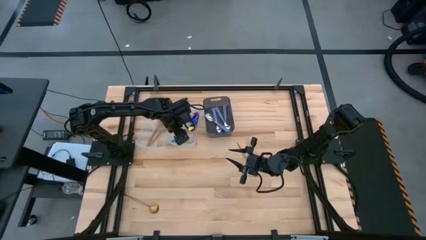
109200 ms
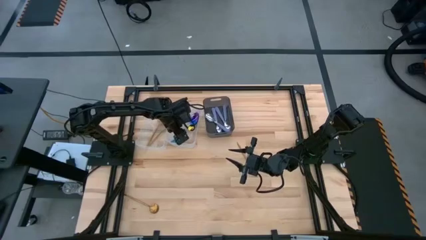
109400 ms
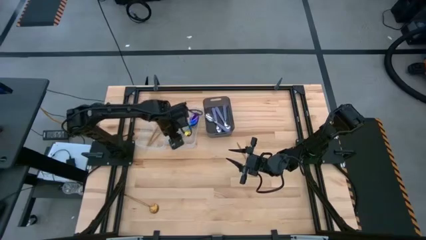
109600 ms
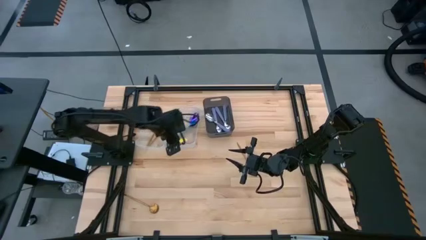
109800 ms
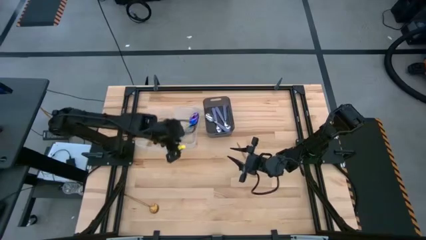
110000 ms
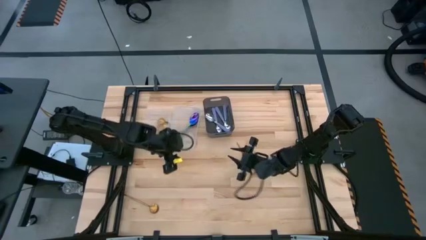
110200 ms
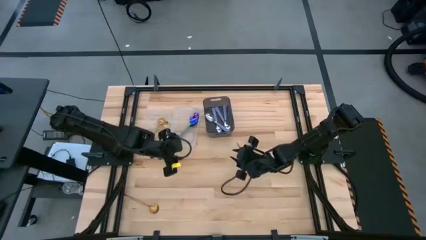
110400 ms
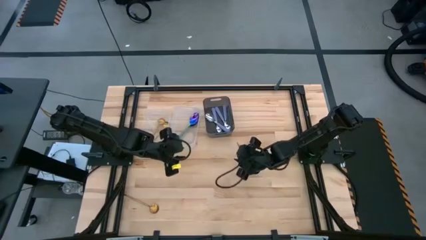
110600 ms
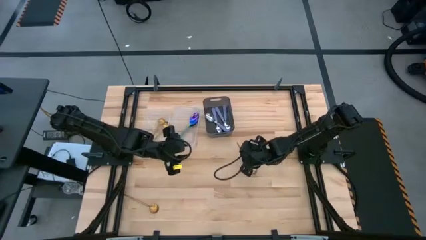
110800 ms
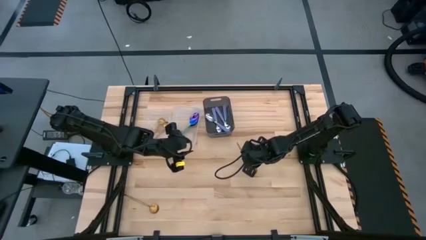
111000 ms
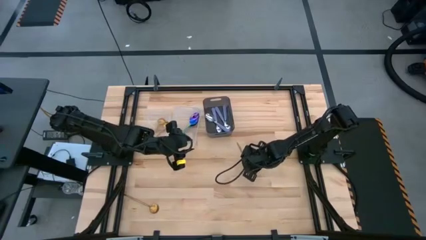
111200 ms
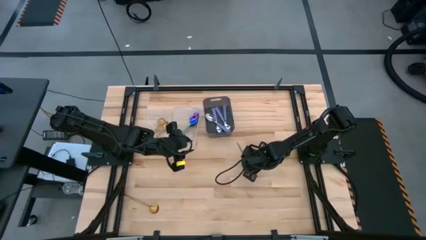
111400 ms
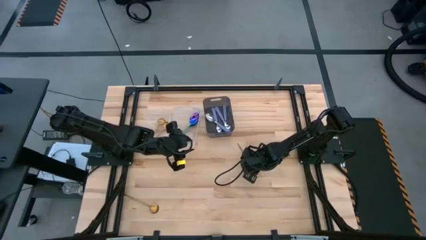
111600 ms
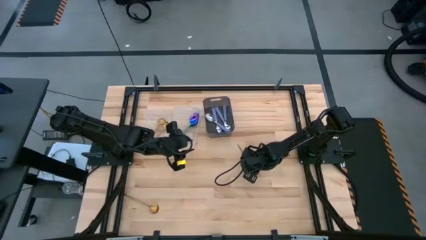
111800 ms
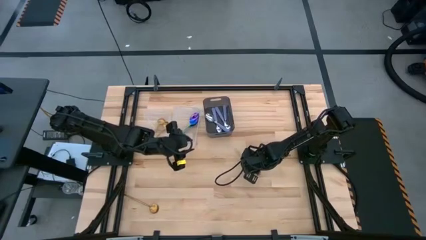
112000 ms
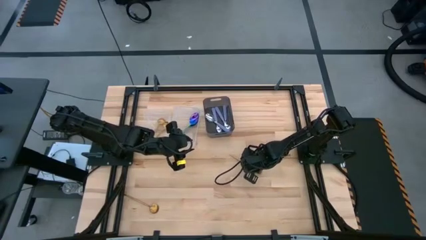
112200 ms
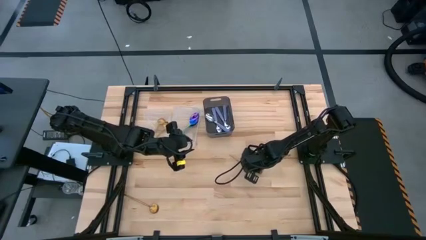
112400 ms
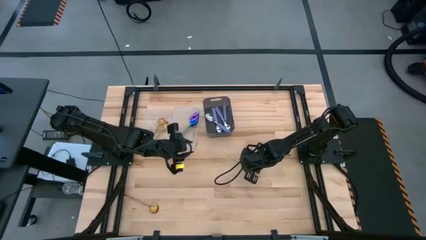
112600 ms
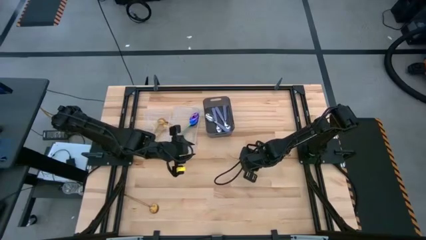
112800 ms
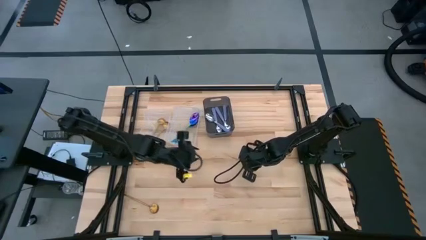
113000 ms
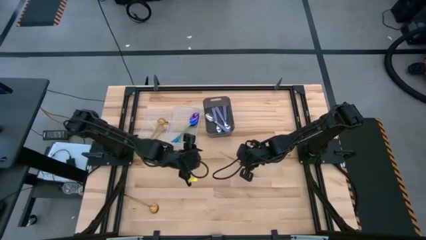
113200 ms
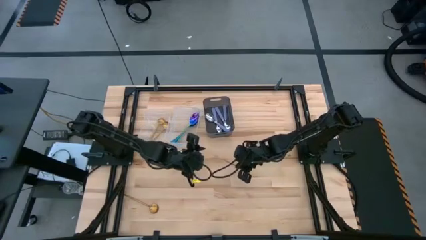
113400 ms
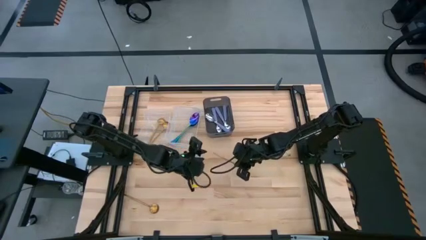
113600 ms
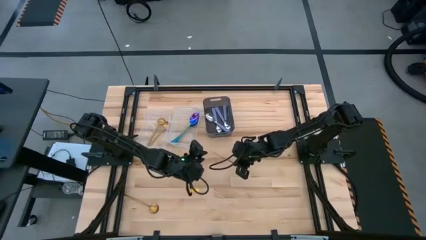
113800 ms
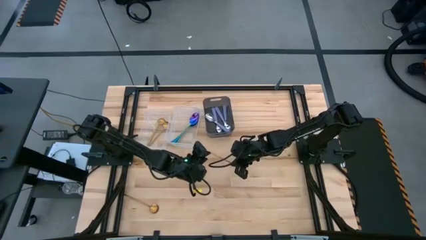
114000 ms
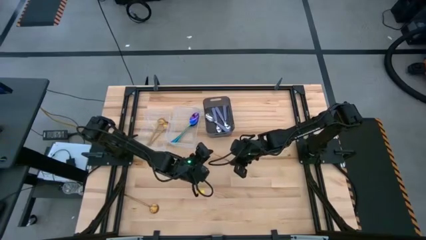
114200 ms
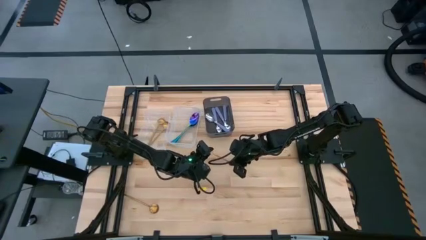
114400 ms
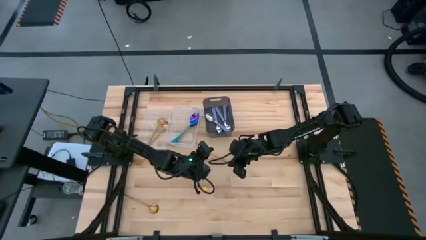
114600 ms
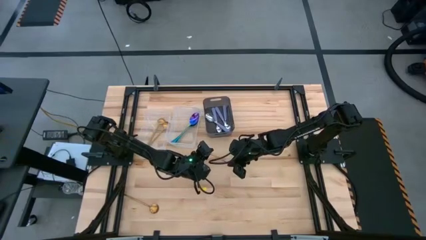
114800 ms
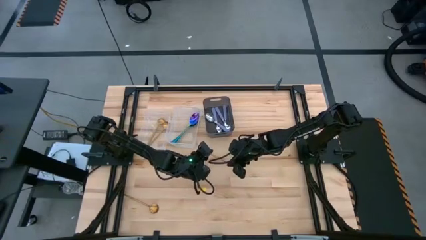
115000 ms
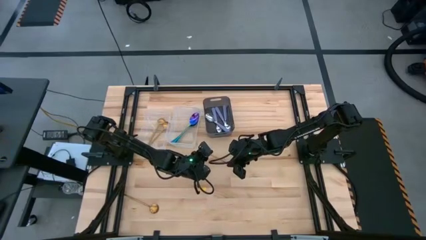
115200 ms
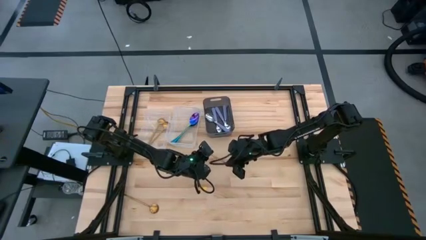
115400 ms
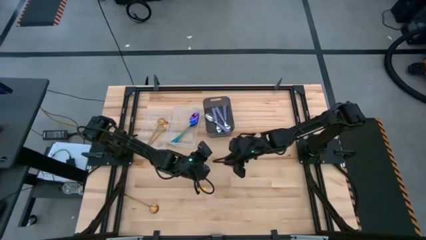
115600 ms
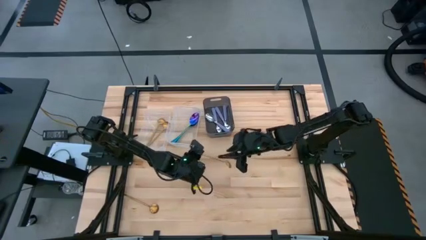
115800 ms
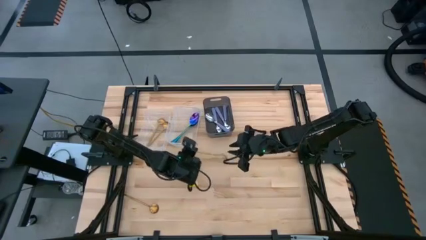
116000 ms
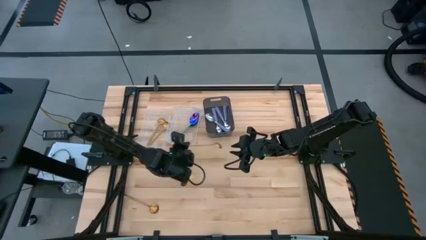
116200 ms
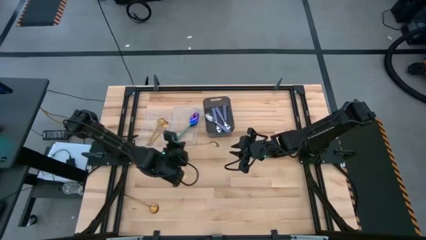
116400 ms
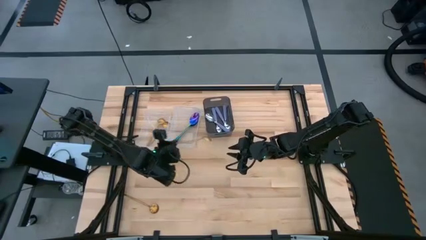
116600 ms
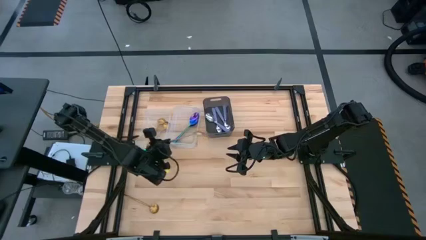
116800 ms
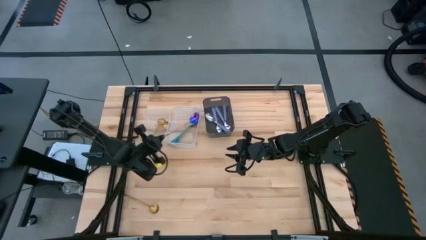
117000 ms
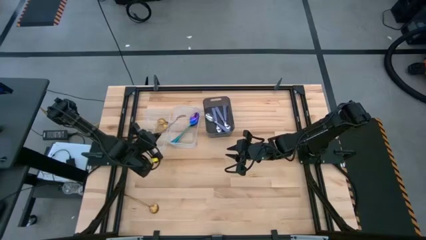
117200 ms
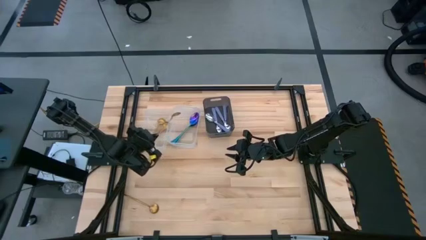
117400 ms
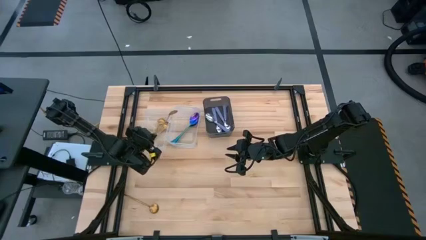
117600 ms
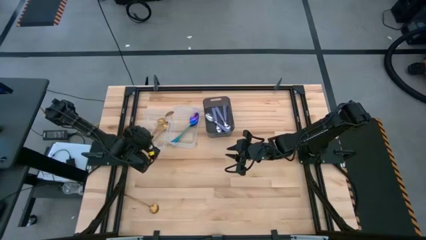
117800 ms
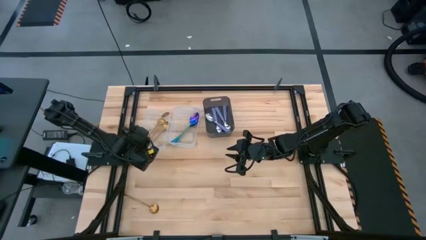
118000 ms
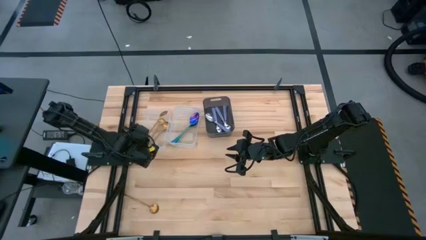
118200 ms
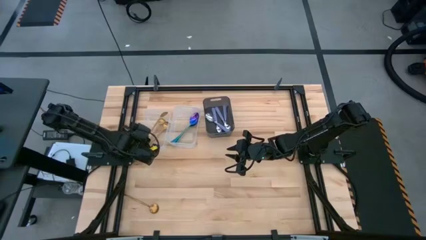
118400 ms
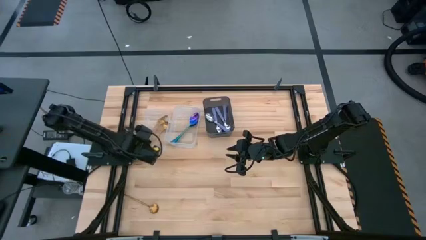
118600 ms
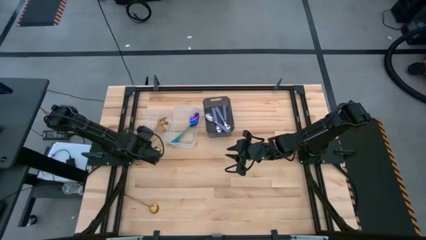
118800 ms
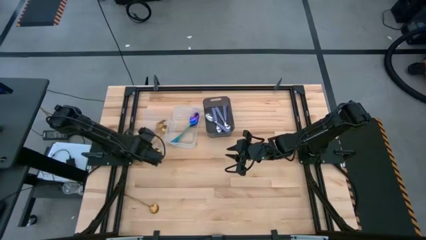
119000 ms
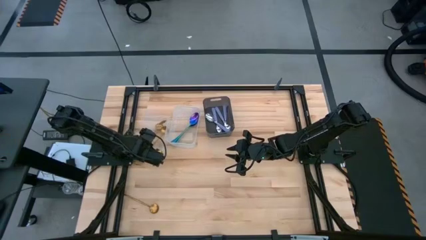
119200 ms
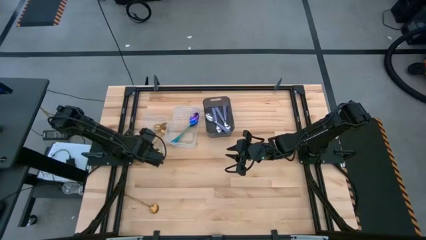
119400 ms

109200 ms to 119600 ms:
Task: Sort silverware by color (type)
Put the gold spoon into the left transparent bin

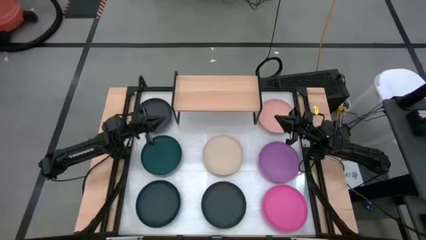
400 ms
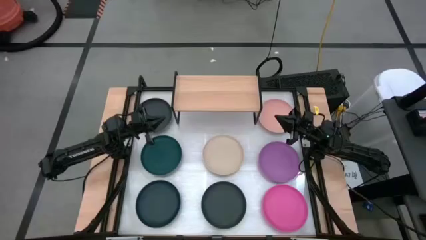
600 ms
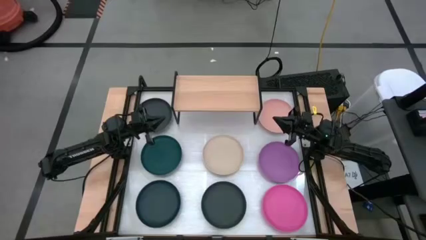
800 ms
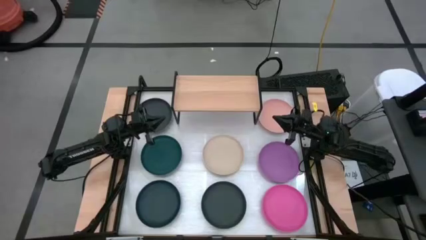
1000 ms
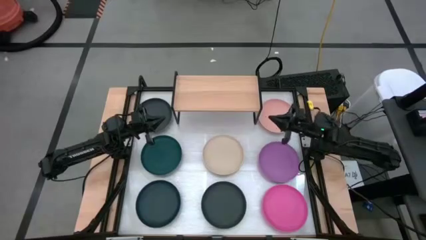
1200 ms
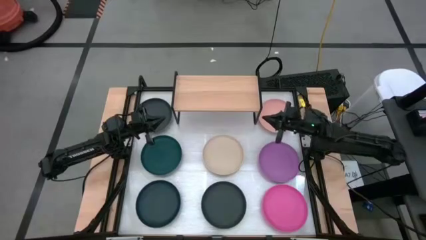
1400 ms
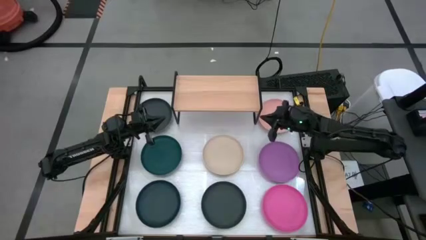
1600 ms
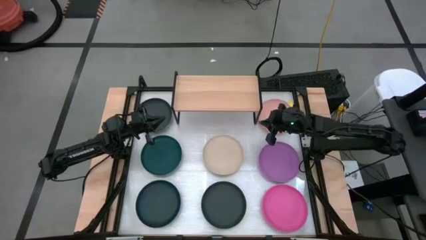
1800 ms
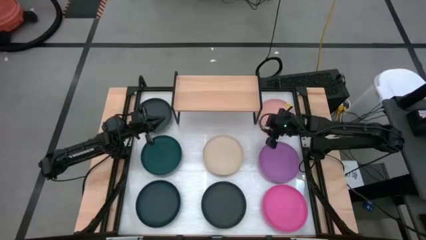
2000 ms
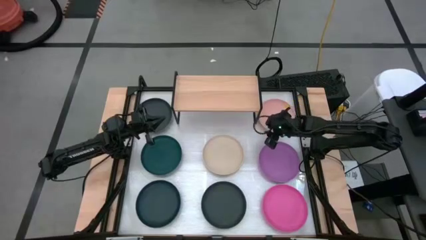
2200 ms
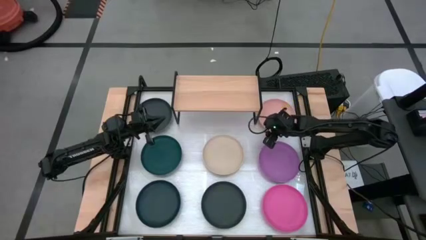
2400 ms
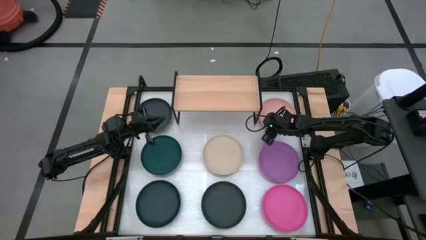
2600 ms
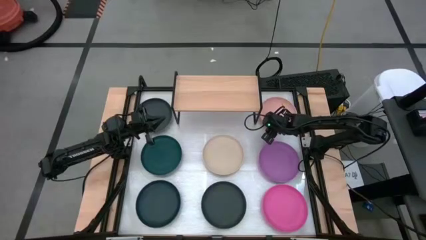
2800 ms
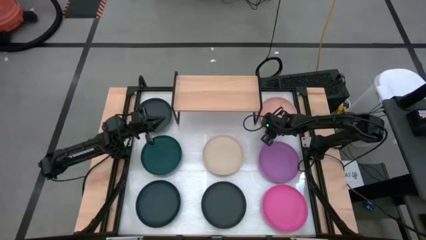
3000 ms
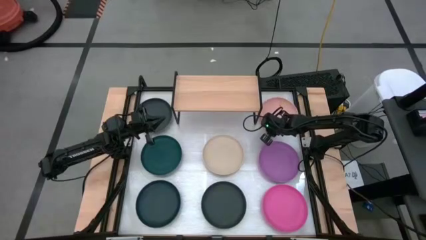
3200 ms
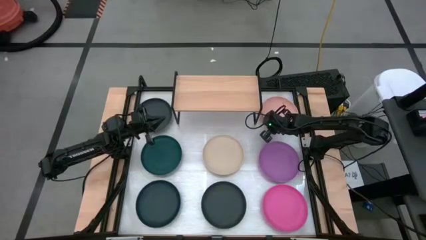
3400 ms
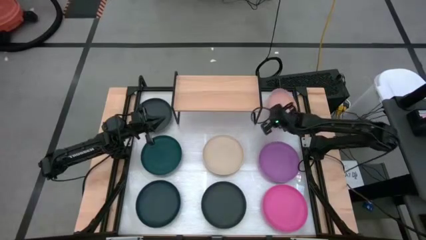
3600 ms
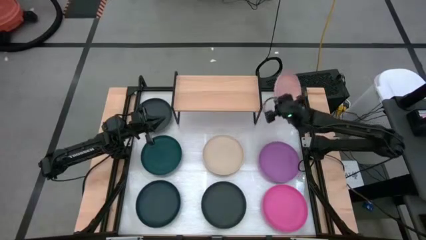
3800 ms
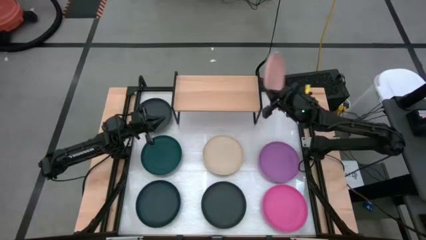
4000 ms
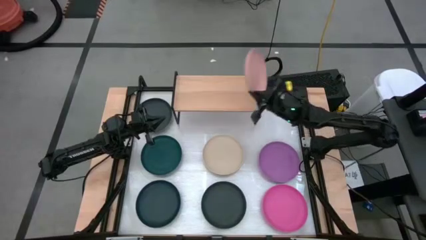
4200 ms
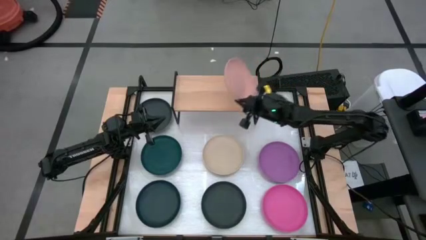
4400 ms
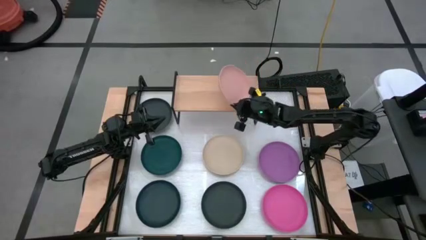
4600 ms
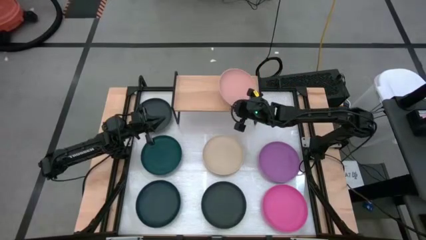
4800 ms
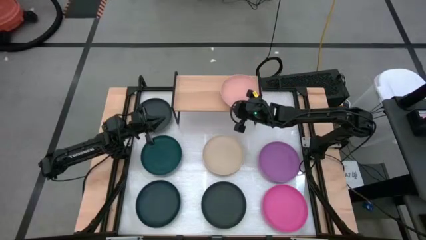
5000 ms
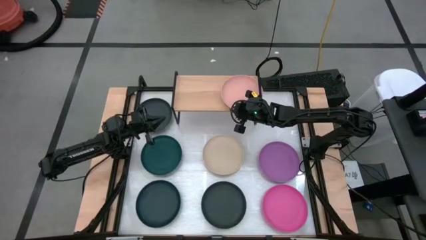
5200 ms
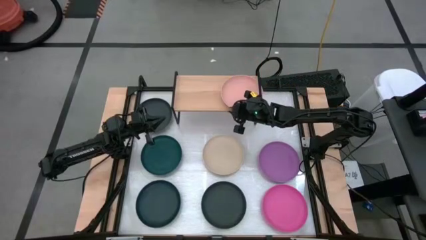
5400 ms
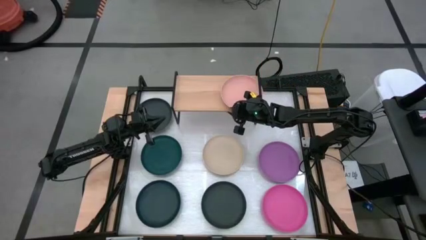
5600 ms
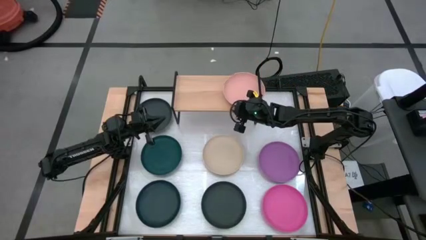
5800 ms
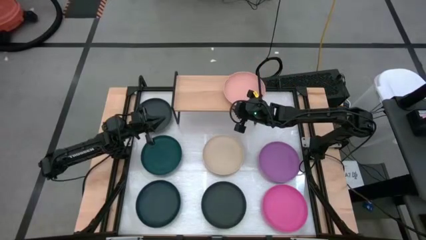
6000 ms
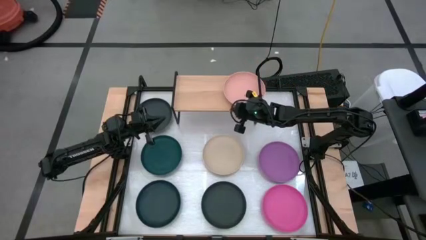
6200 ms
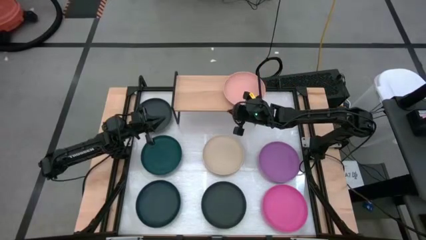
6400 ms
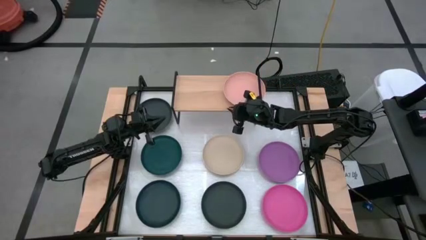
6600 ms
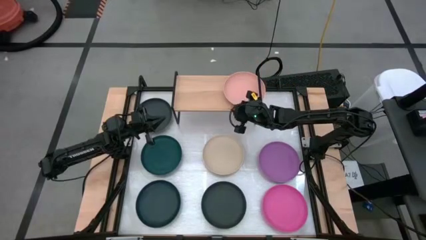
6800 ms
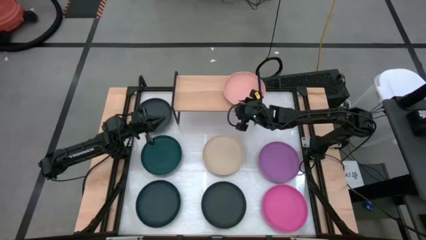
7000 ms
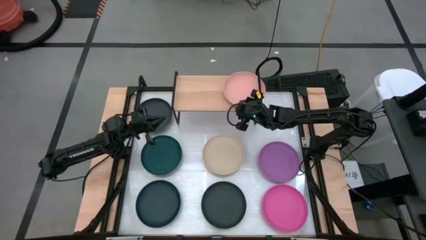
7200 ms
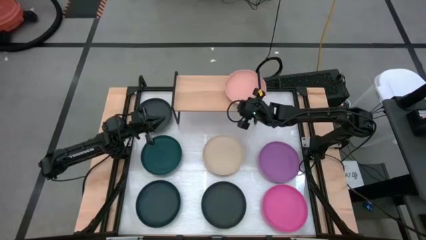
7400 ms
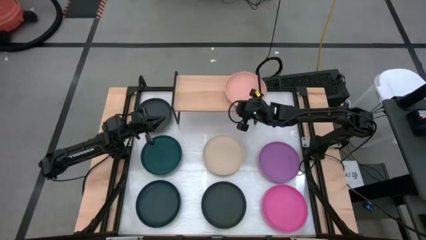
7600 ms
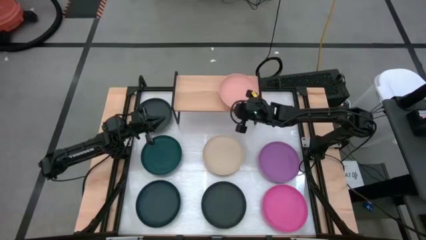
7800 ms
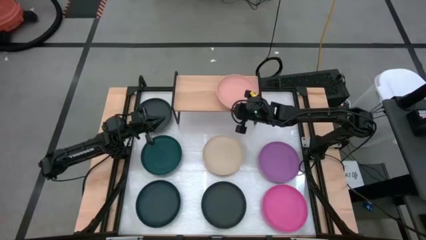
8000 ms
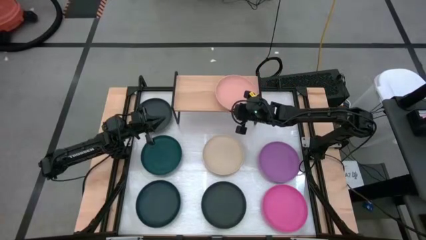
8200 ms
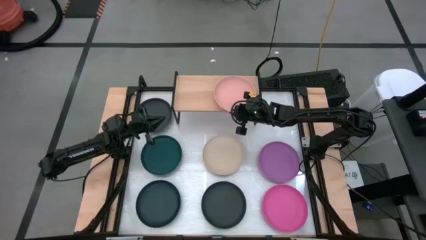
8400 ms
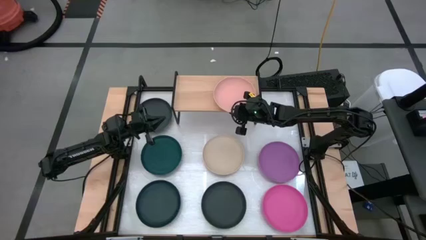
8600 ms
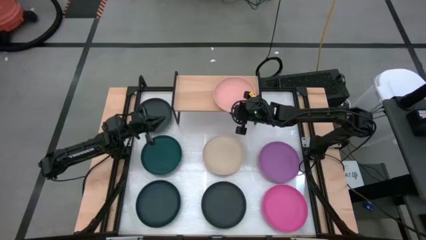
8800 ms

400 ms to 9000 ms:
Task: Place and stack plates onto a shelf
Put the brown plate on the shelf
